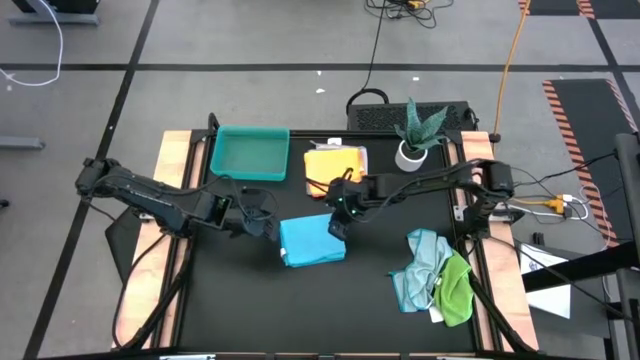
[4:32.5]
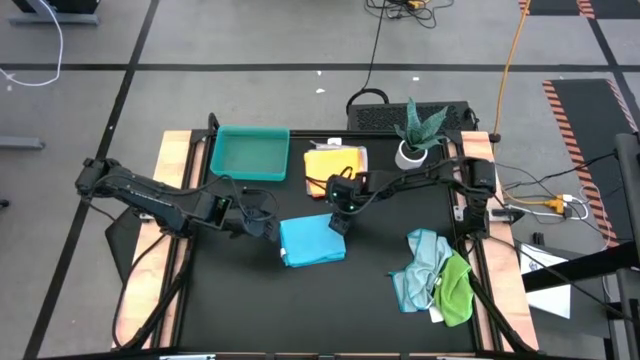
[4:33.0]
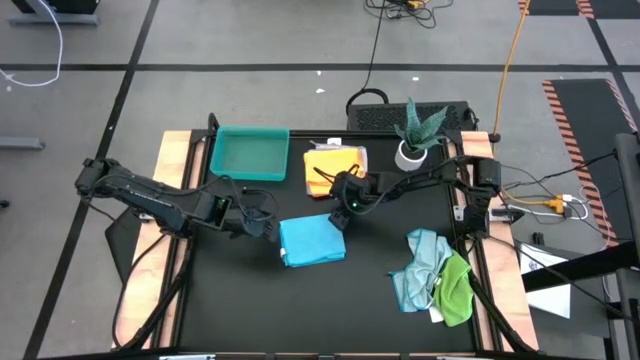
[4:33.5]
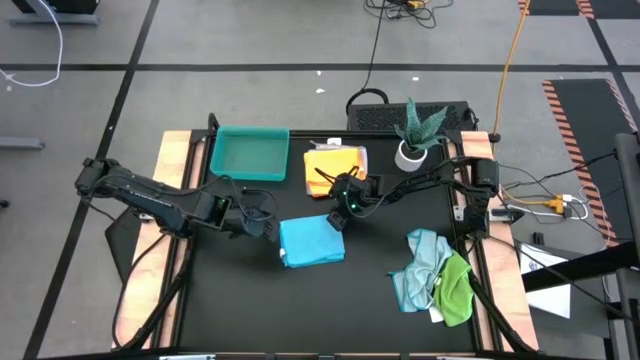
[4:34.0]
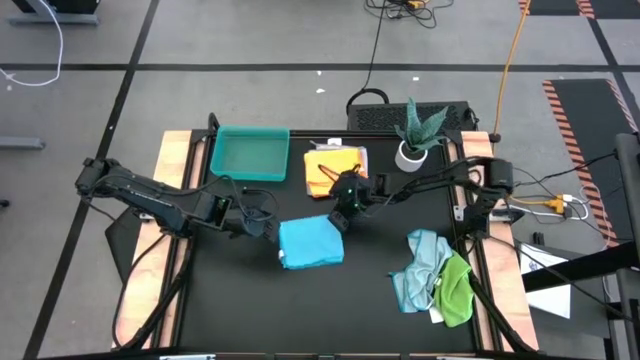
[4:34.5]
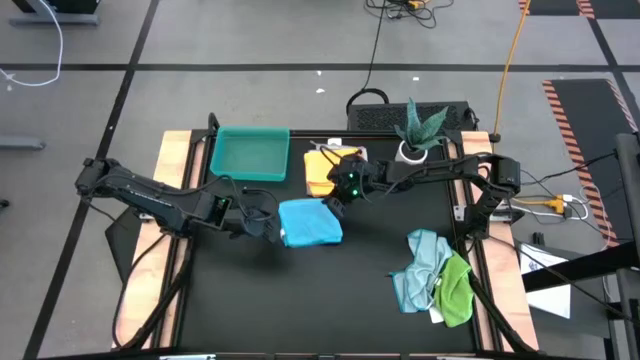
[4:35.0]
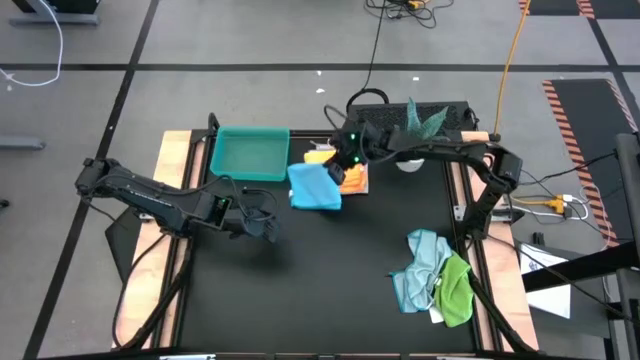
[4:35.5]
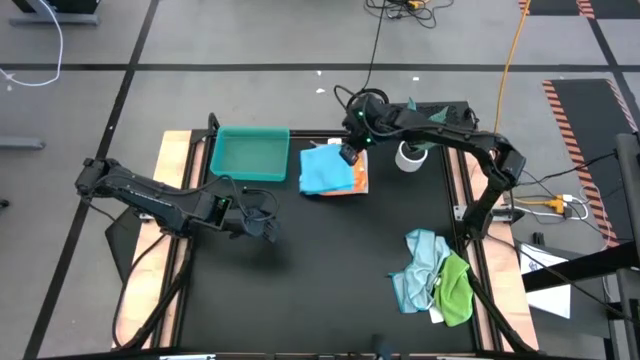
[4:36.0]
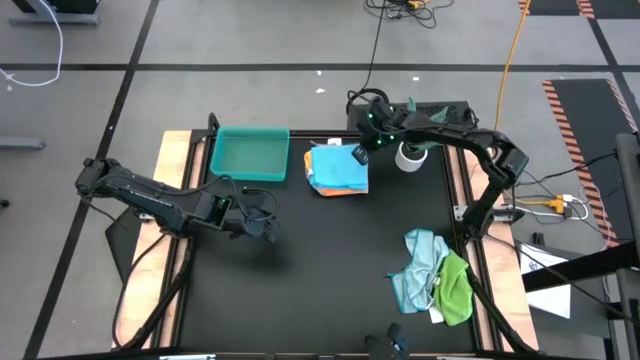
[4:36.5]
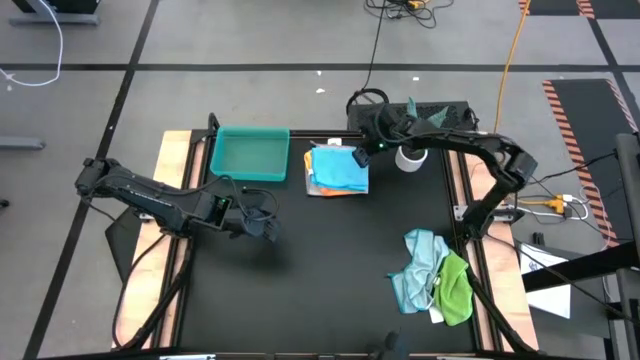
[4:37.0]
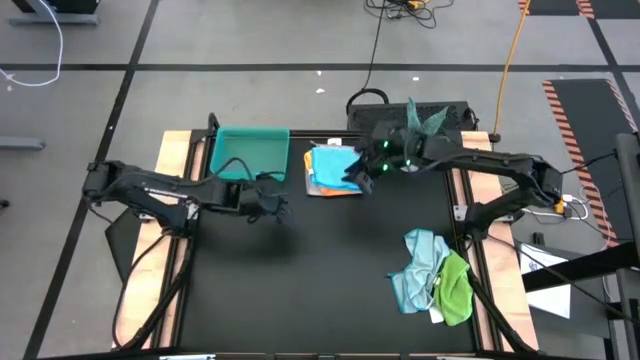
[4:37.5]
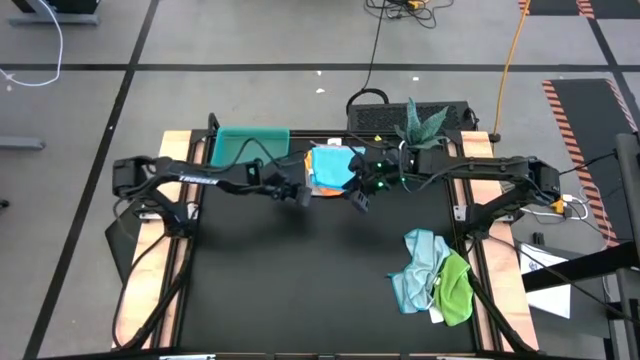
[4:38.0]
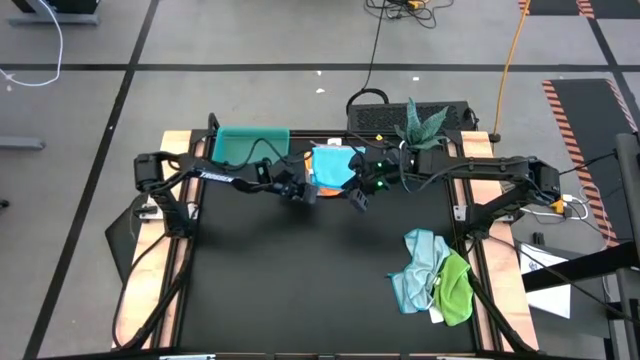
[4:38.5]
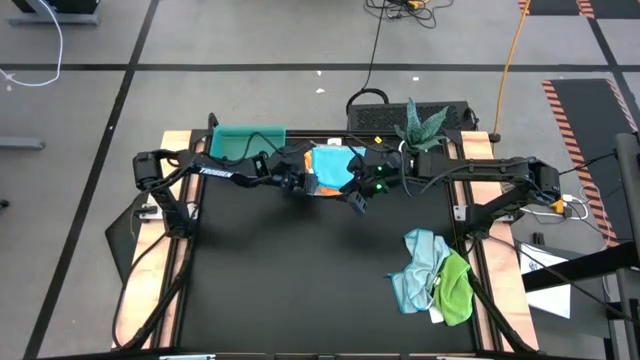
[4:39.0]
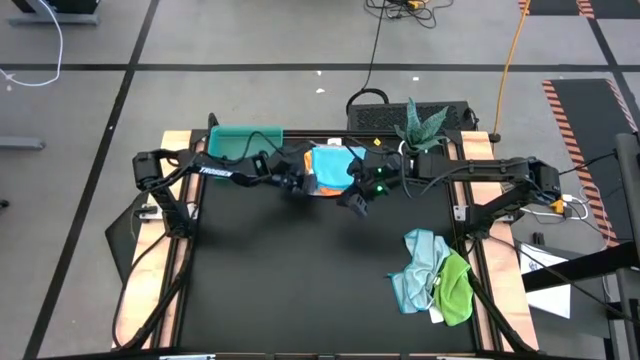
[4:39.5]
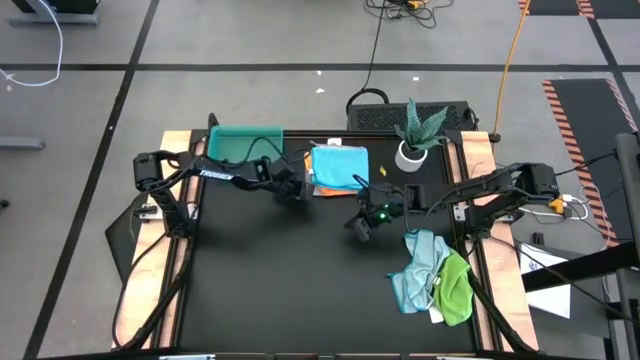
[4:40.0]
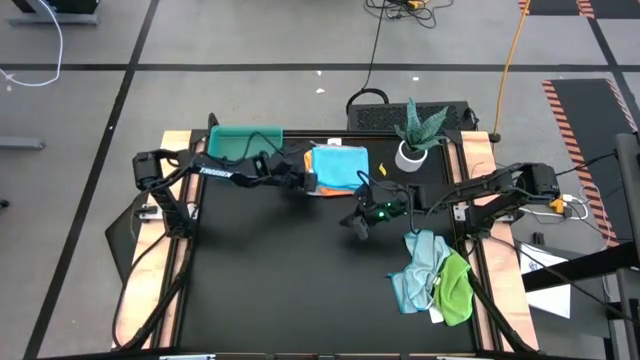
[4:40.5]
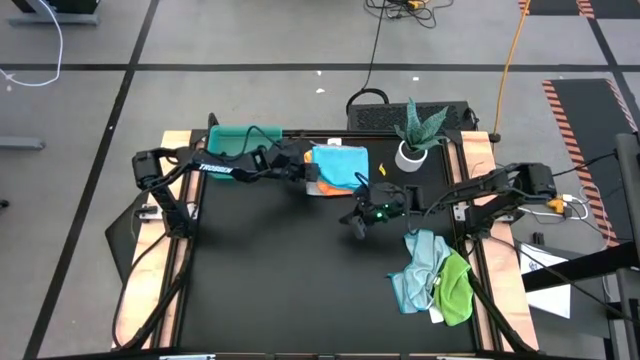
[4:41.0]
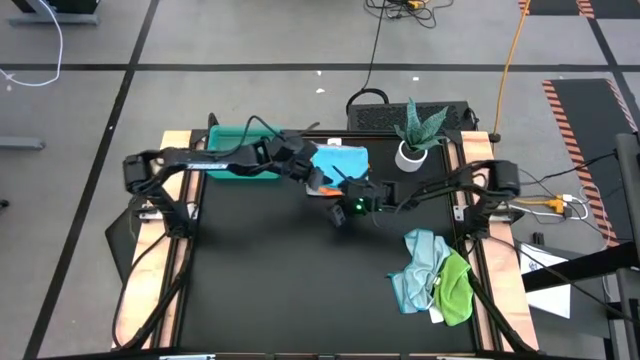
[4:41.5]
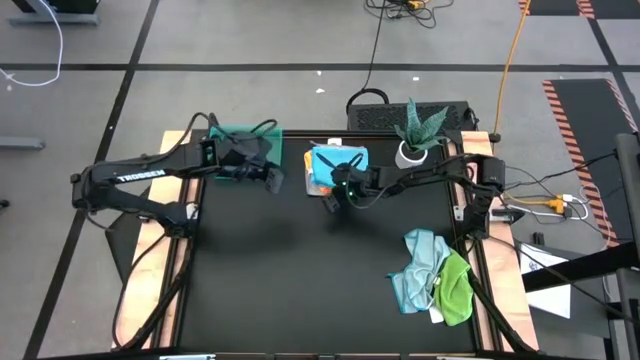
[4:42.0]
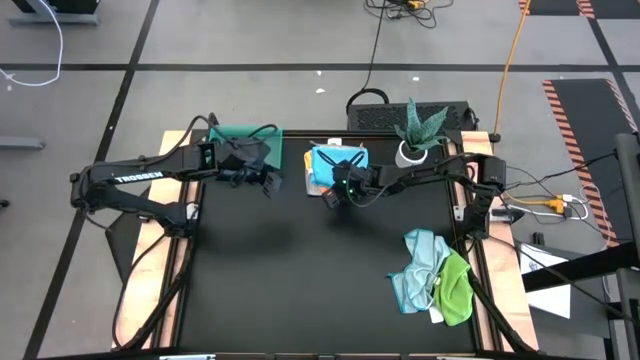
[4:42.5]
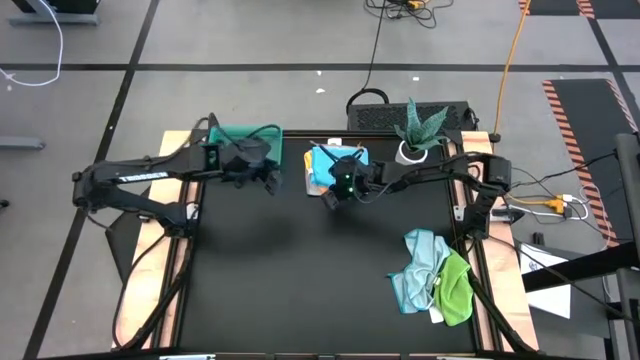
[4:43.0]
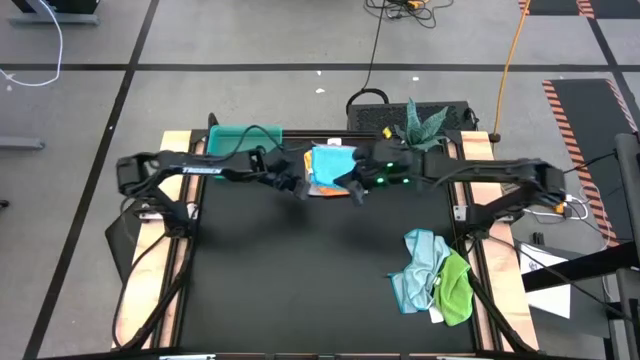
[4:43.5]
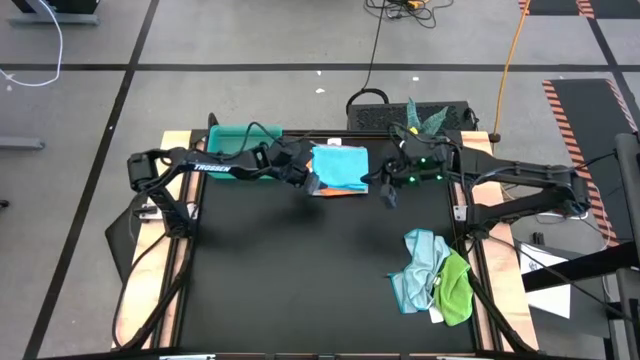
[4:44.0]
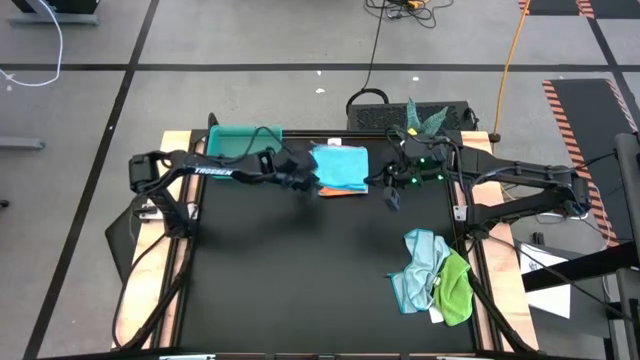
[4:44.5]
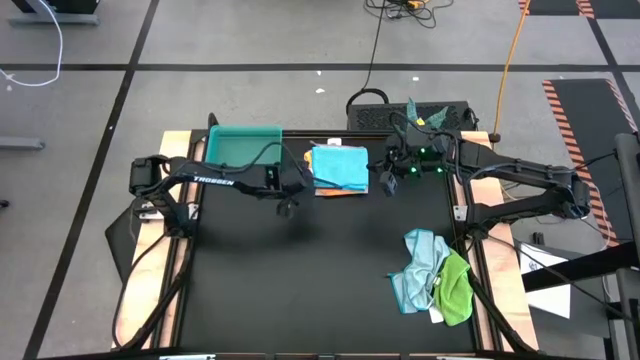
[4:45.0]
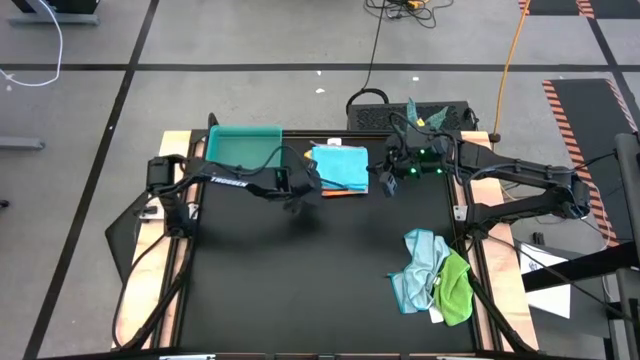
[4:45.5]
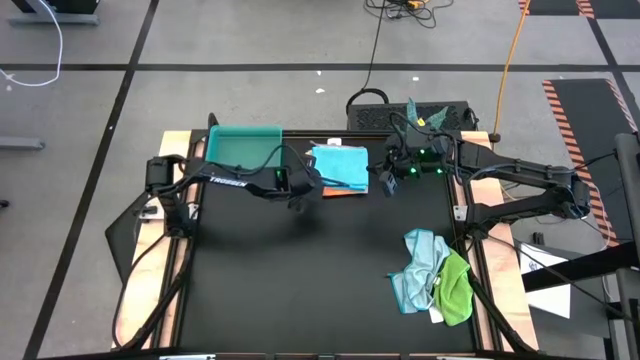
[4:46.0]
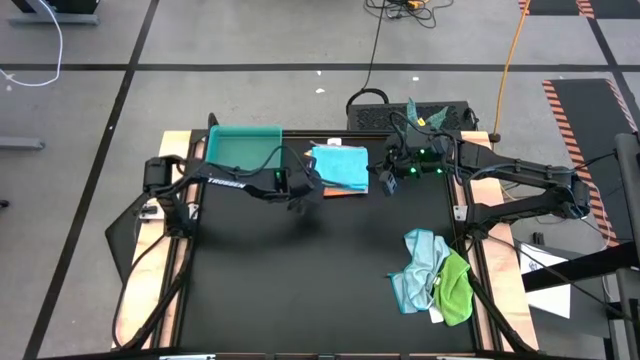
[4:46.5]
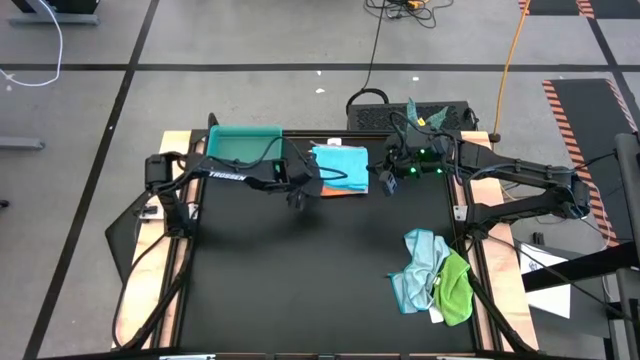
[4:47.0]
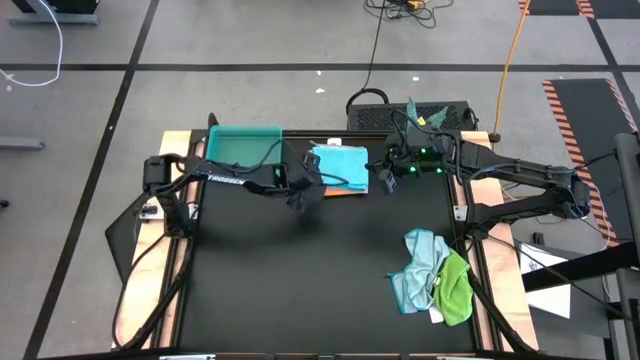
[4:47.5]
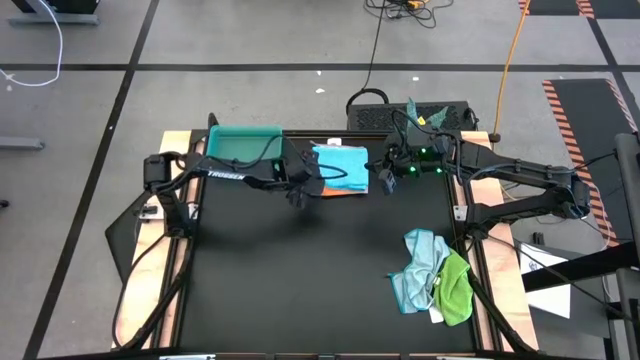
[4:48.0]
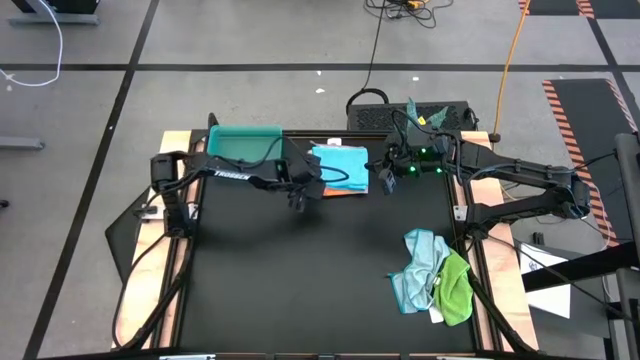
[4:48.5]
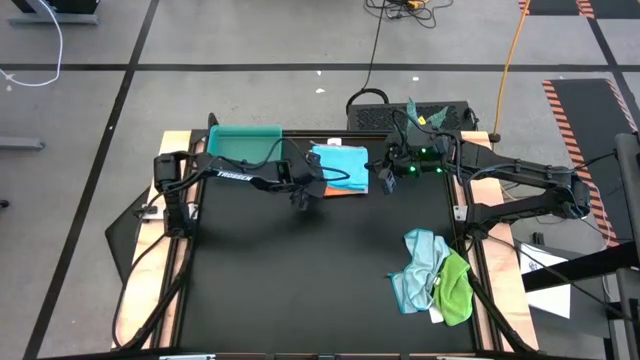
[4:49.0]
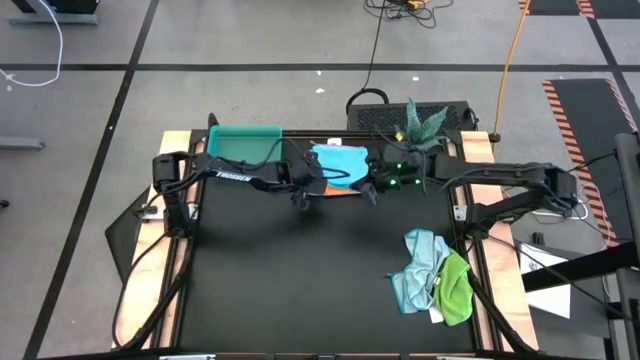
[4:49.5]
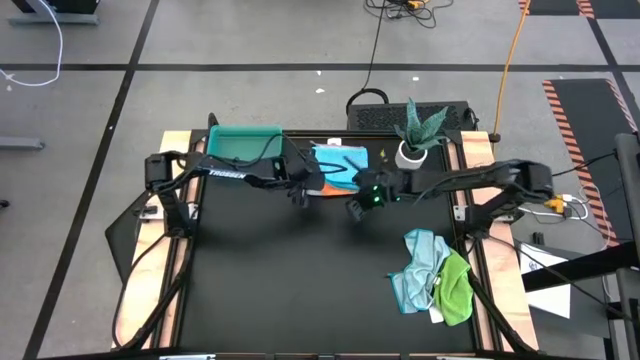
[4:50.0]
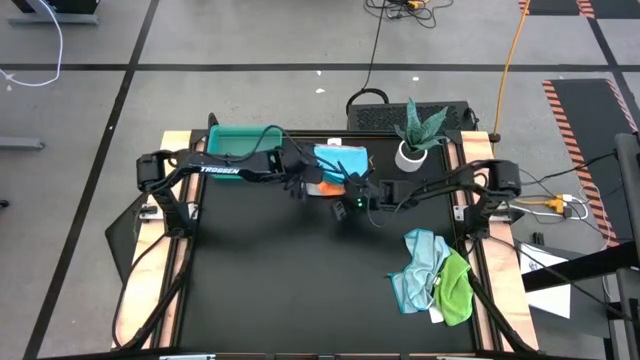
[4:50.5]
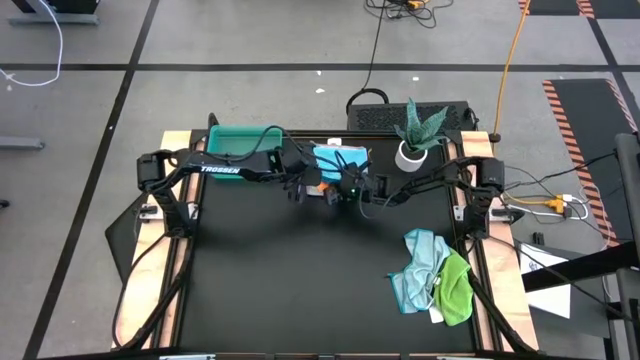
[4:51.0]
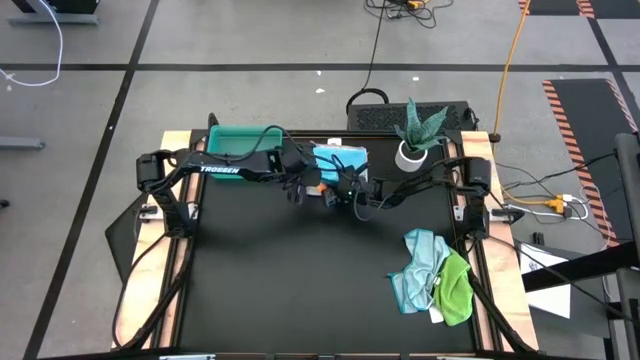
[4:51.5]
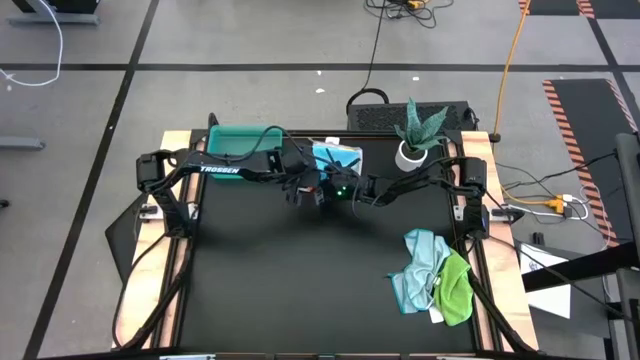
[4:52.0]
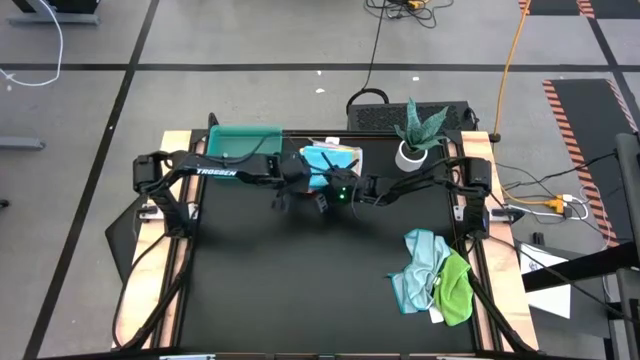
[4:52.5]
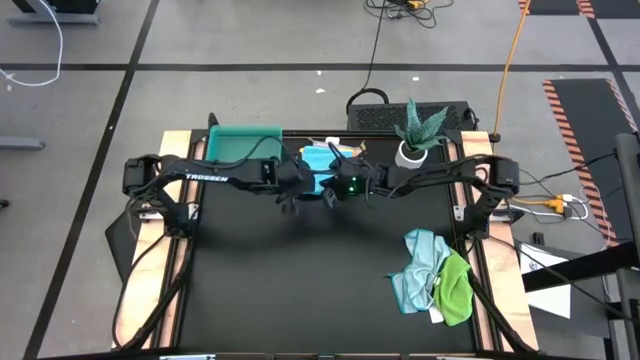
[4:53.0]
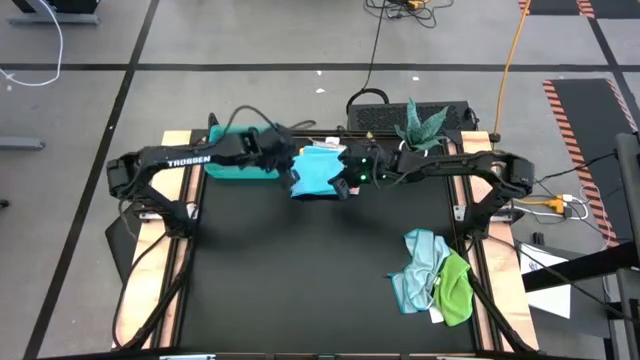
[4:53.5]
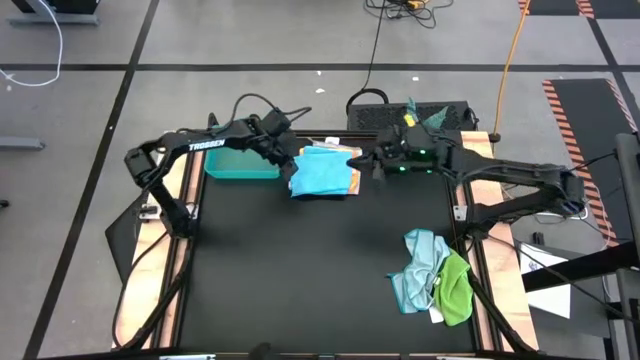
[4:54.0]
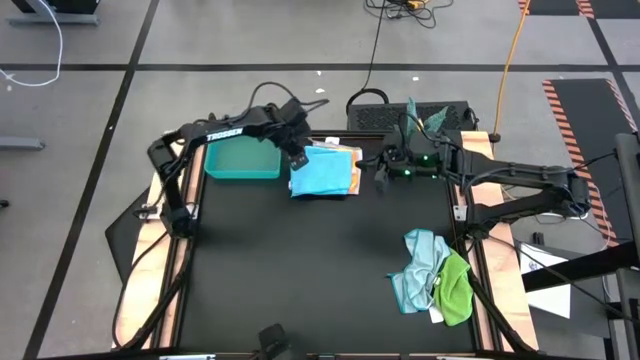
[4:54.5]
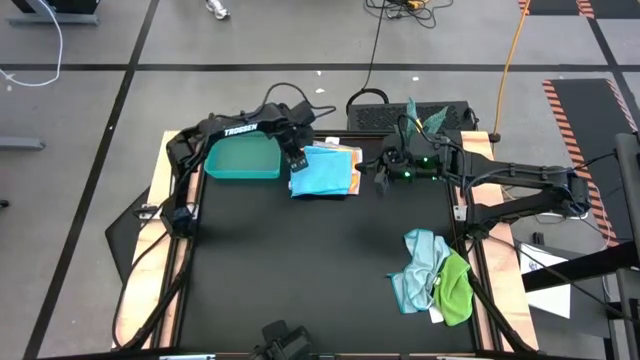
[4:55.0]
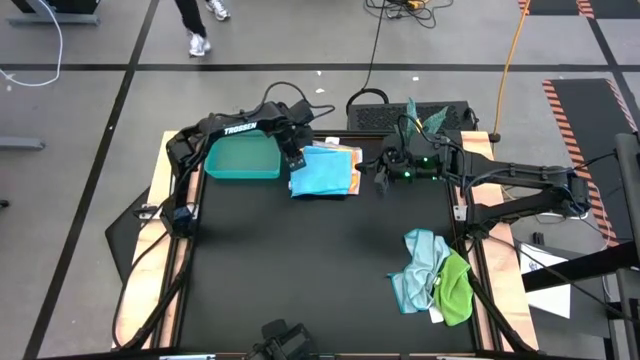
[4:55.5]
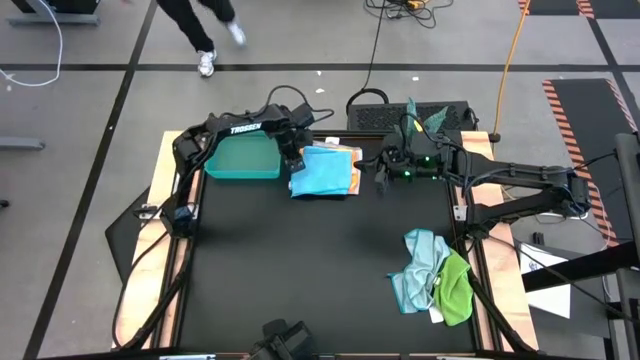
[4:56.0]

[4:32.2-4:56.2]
Task: Fold microfiber towels
Stack the folded blue microfiber towel on top of the folded gray microfiber towel
